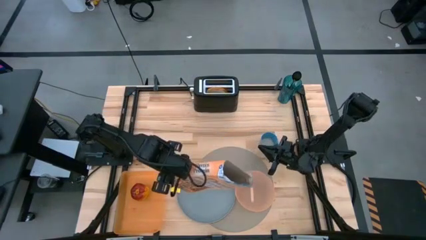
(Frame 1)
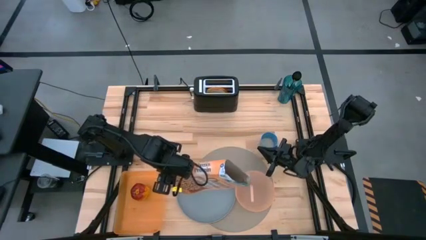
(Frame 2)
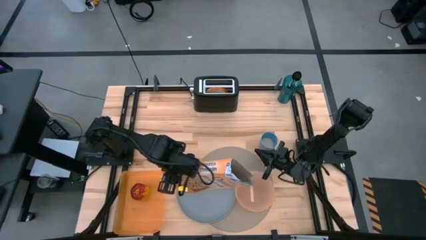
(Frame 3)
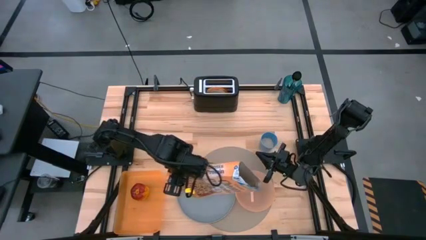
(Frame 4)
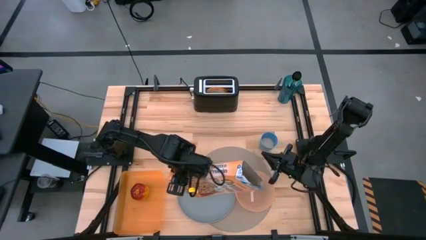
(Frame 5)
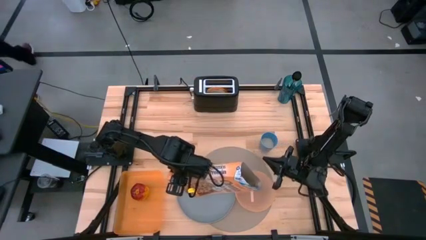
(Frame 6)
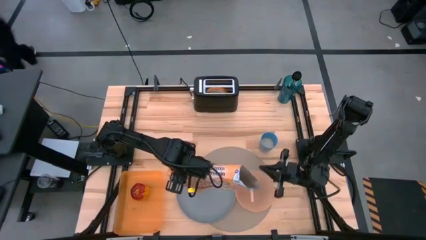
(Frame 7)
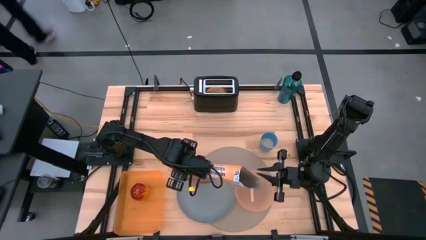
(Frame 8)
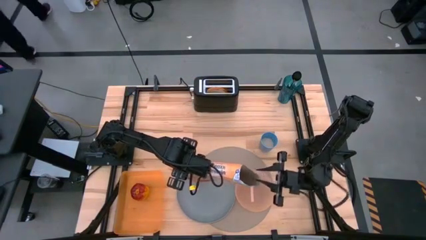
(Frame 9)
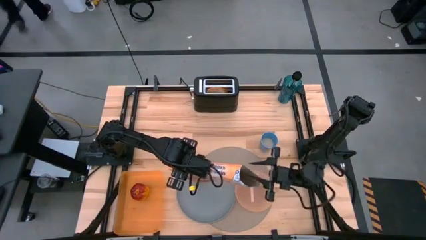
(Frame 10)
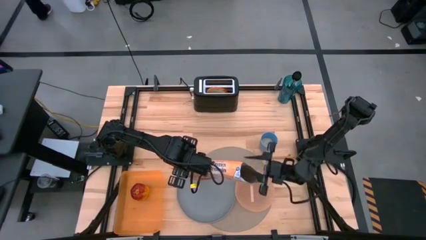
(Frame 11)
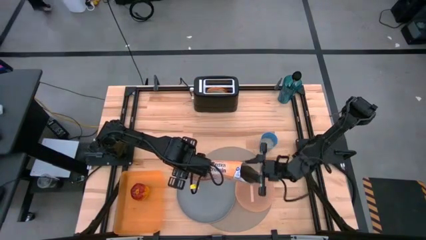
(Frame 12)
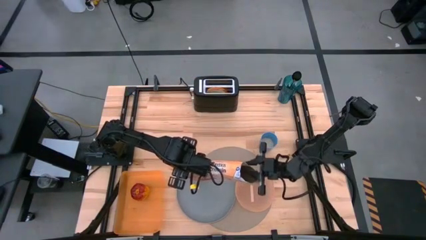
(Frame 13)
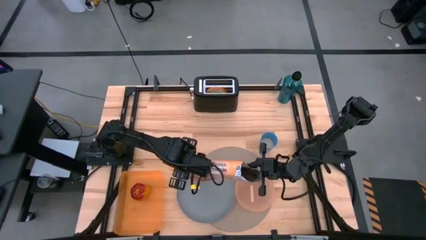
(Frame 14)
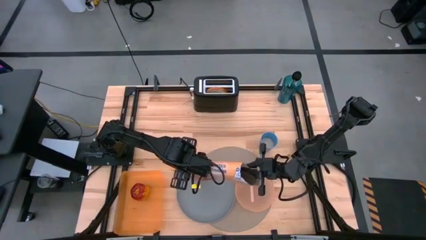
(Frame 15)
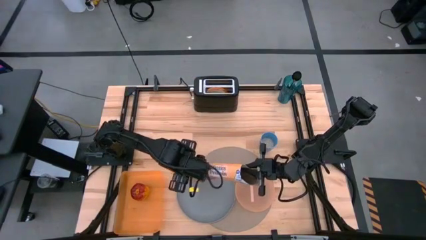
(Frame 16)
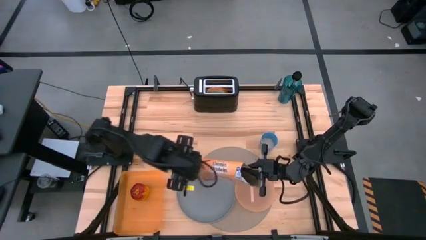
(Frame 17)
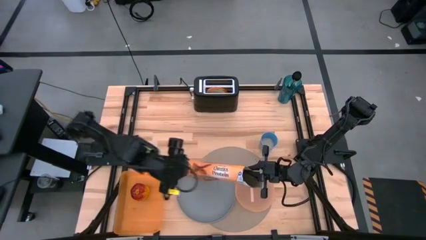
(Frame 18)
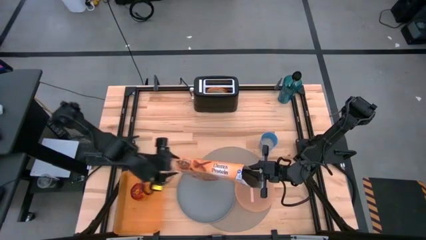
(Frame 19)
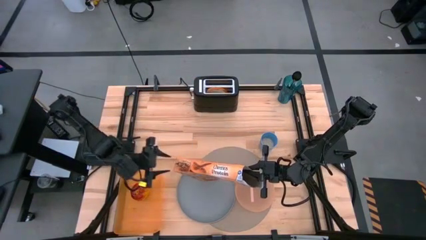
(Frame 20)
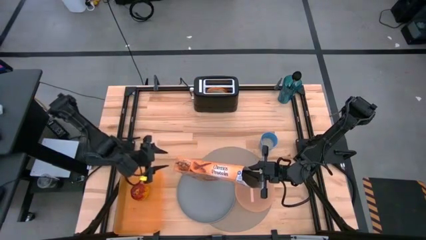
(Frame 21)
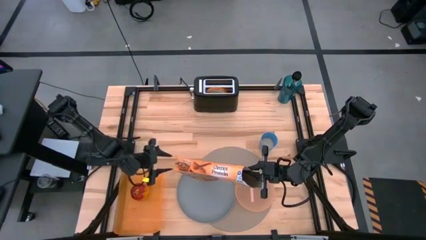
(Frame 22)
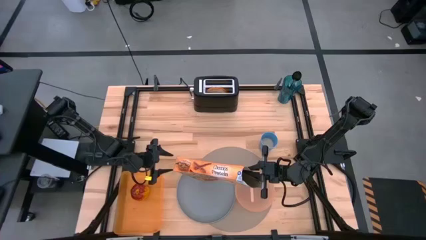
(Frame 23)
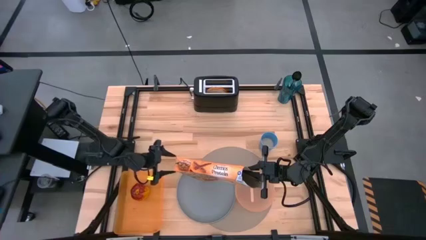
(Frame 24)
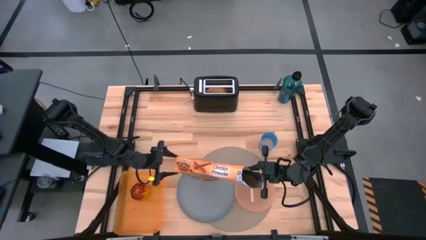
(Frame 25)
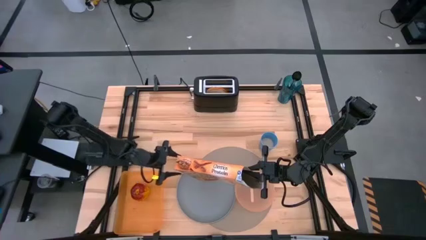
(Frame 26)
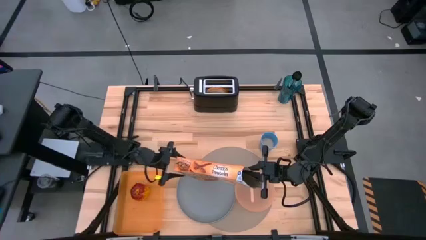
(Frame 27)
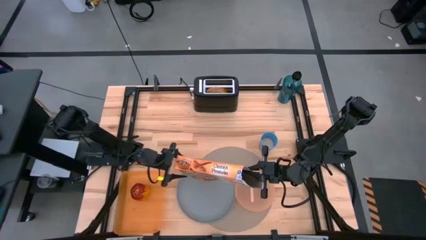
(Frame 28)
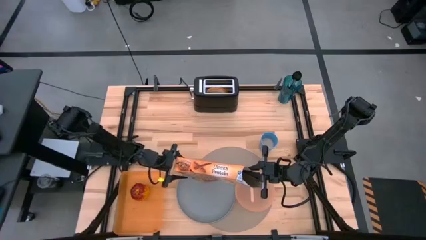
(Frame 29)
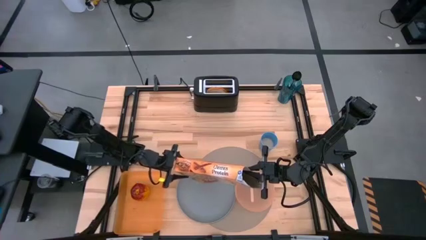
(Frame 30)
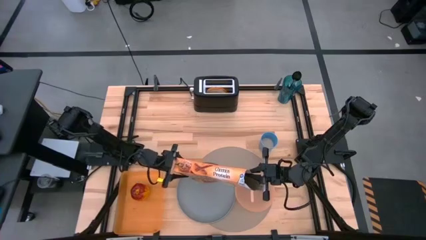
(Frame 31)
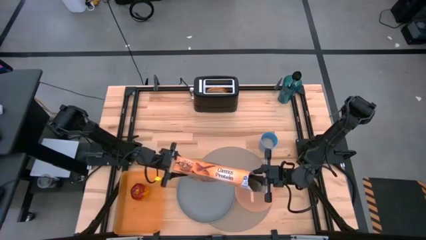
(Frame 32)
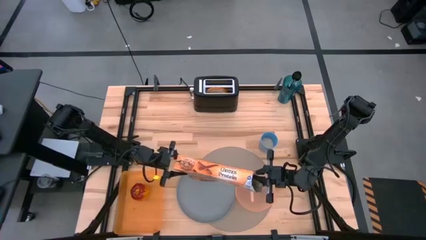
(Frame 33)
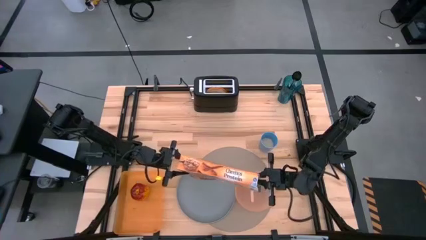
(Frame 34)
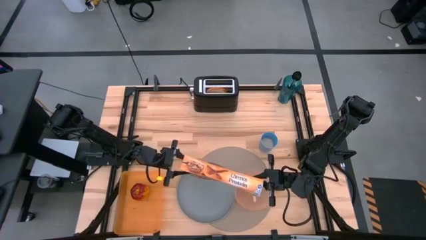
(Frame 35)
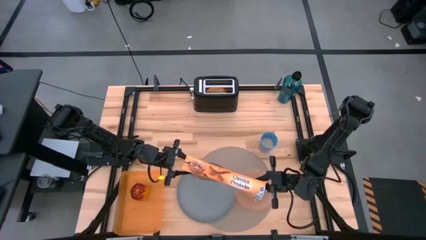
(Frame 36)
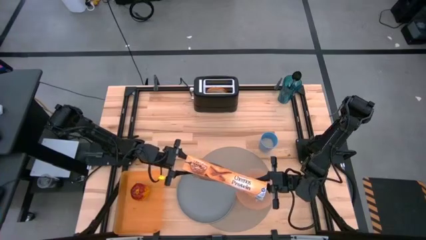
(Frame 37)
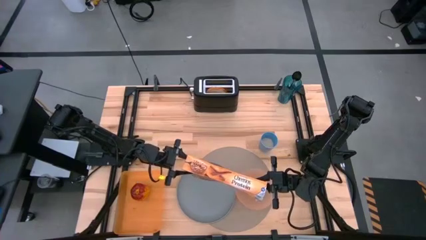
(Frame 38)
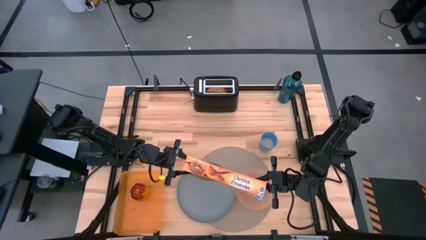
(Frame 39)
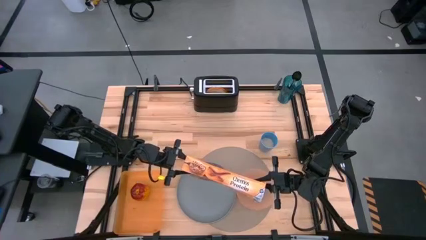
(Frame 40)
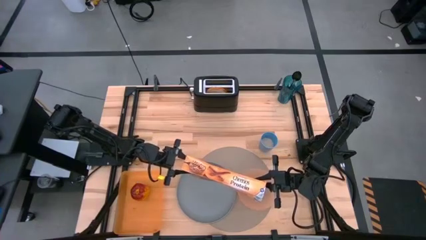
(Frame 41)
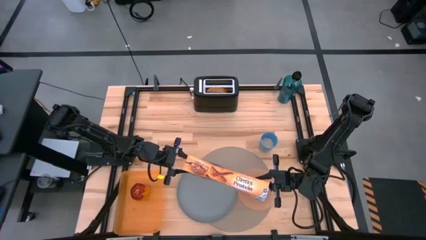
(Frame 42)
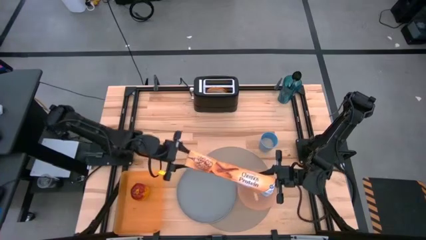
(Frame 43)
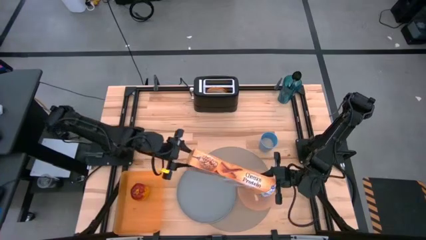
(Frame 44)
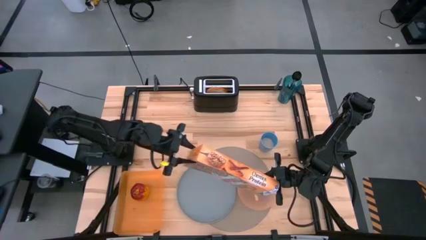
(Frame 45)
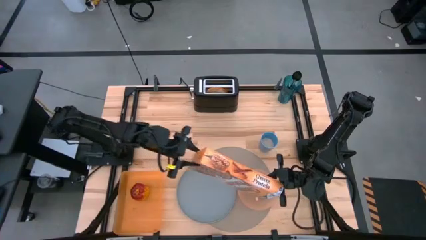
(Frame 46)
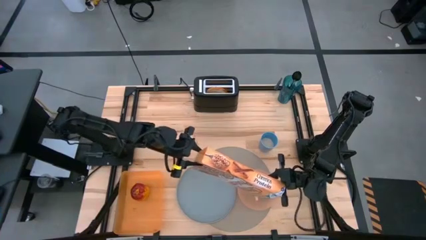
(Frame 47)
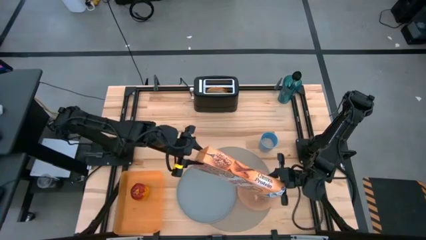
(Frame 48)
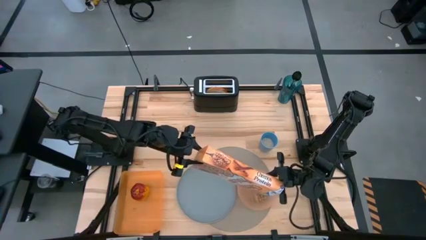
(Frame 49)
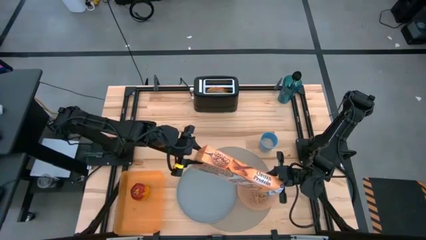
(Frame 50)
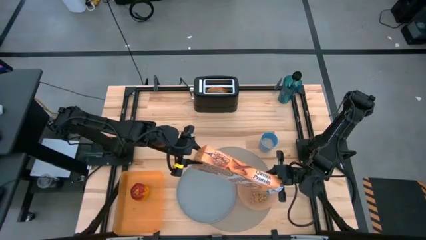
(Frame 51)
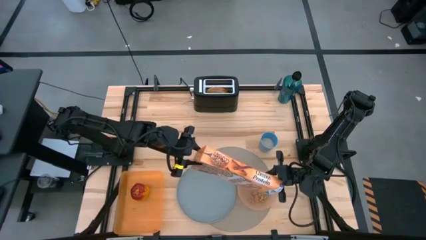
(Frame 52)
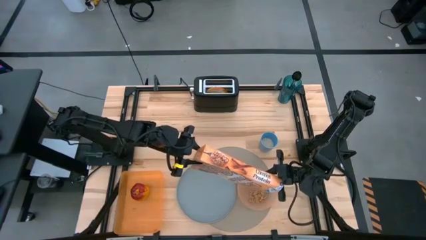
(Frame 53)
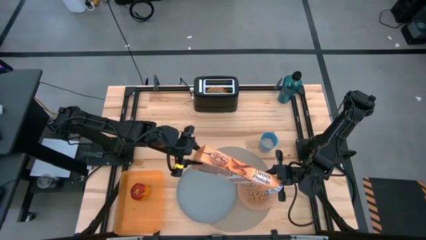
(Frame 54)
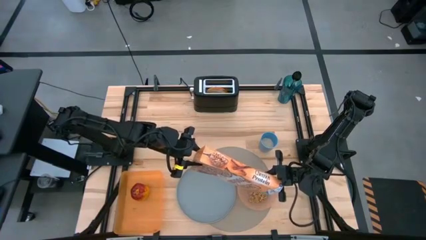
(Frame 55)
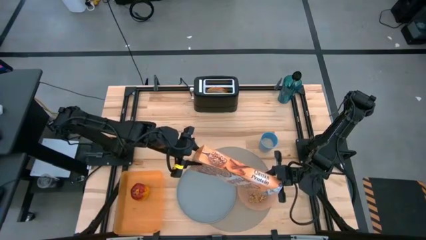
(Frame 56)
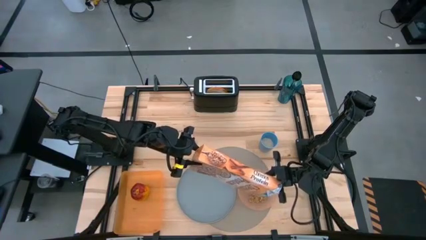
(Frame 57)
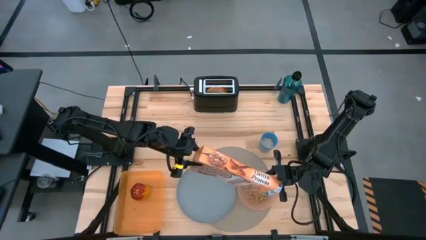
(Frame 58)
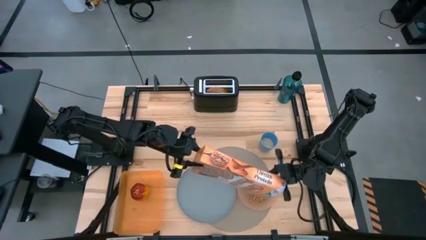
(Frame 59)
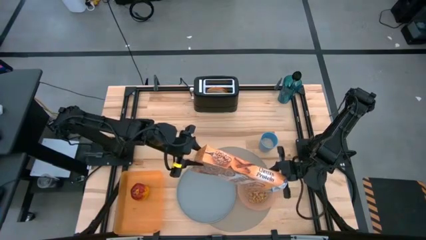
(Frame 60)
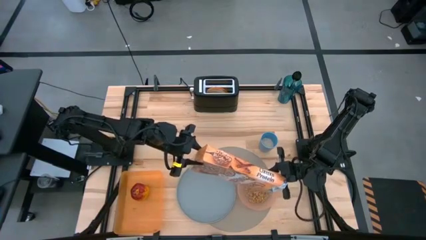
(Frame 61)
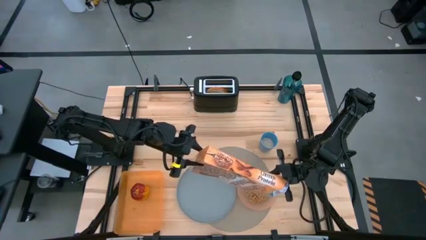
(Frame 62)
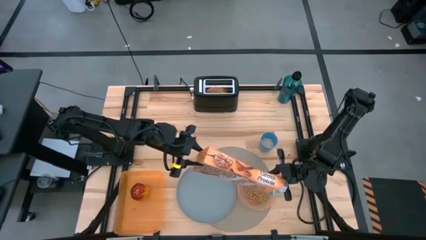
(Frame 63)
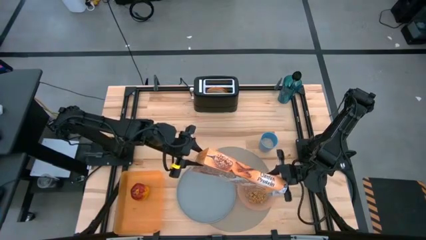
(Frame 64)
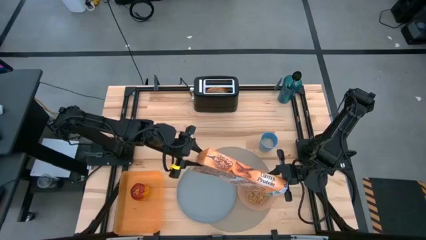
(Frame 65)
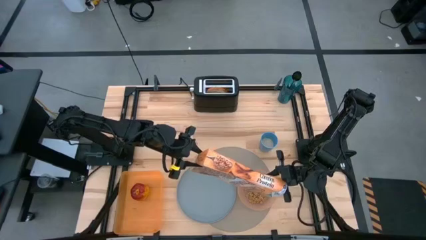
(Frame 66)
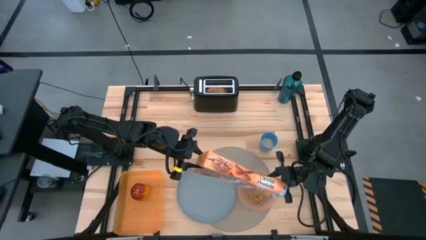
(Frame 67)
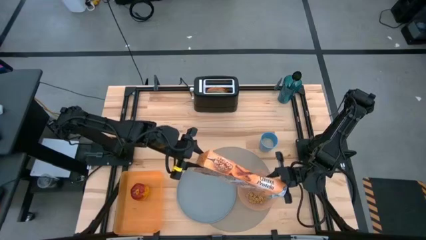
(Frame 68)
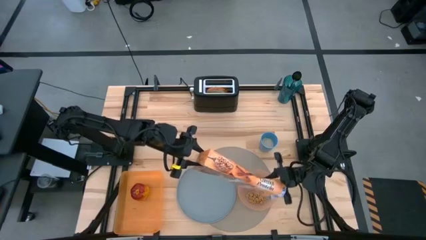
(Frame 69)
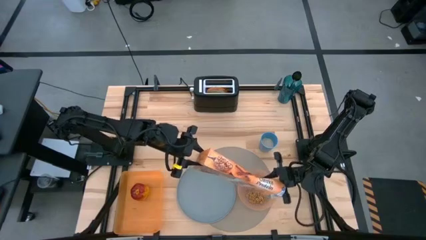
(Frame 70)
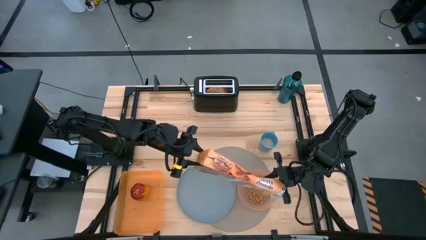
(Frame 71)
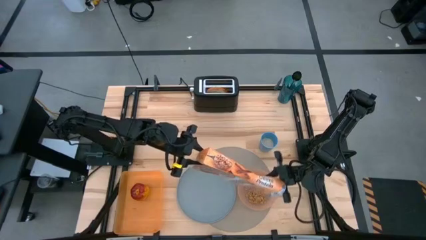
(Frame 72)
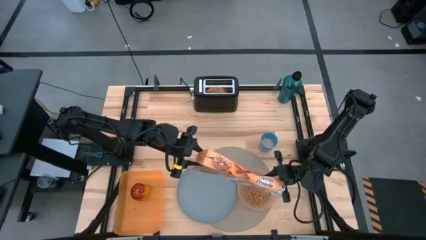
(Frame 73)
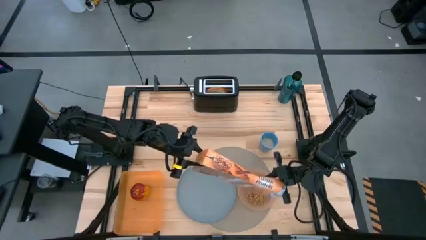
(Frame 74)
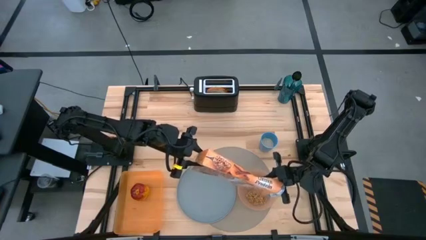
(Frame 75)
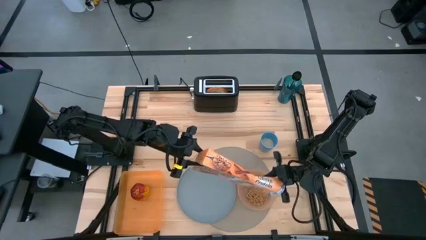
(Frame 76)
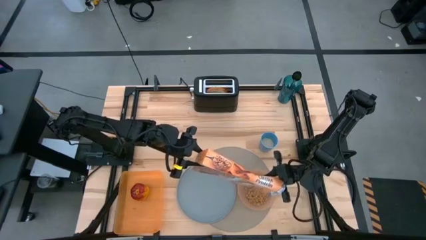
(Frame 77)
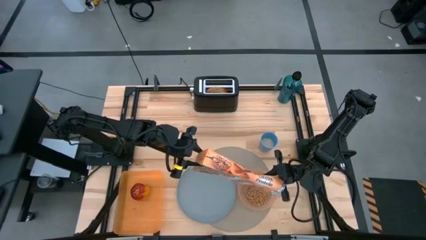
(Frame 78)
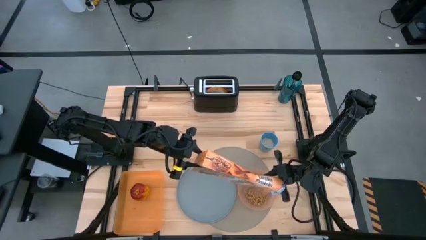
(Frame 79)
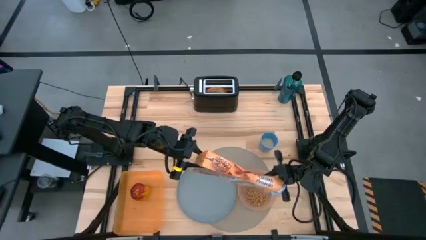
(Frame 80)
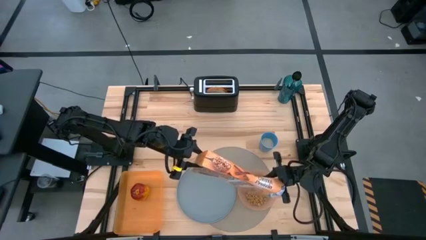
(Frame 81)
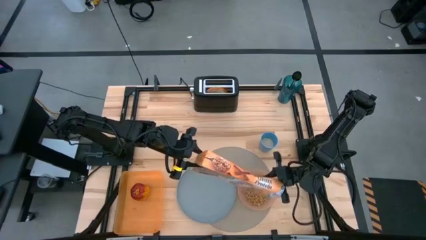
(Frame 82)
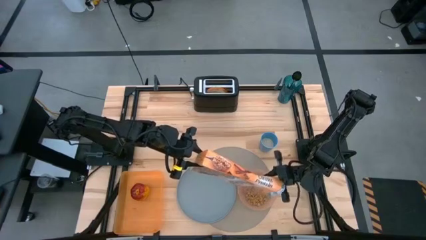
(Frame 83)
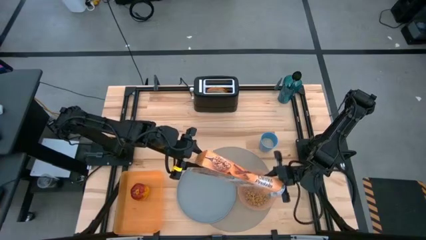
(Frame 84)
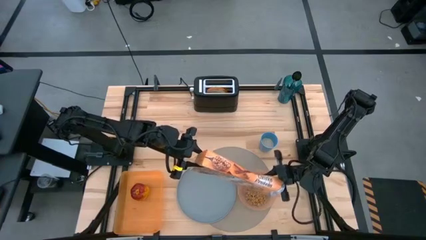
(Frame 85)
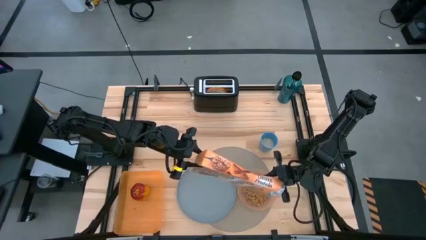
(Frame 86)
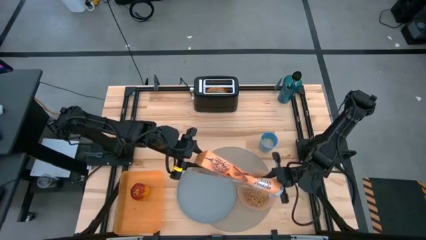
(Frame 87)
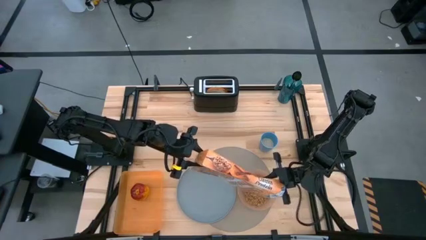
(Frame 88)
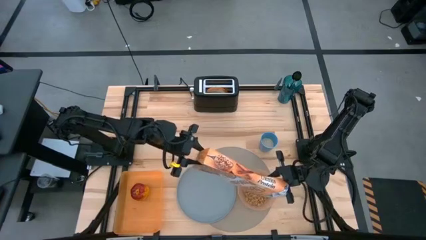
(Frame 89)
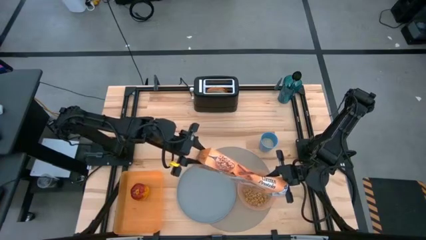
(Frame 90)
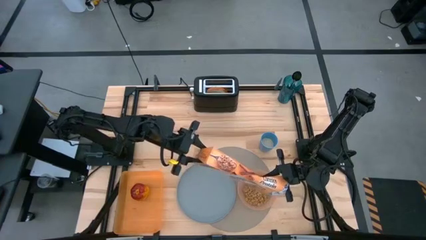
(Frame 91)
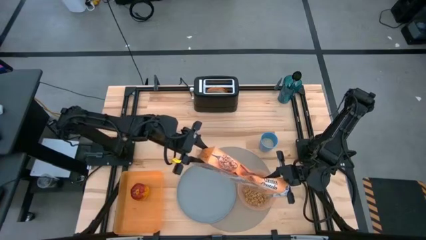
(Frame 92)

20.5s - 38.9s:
Task: Arrange a breakfast setting
Pour the cereal from the cereal box into the orange bowl
